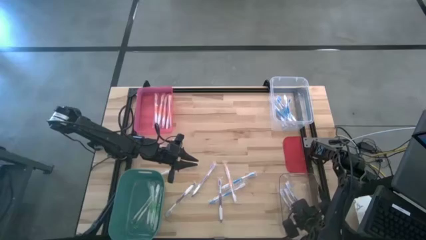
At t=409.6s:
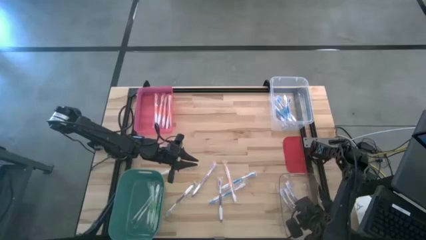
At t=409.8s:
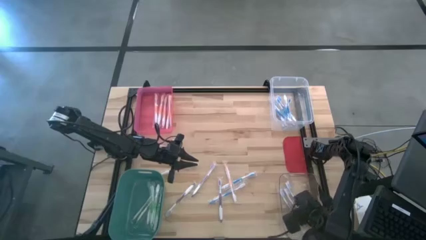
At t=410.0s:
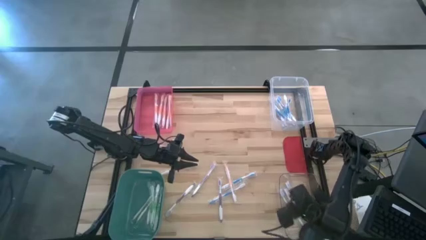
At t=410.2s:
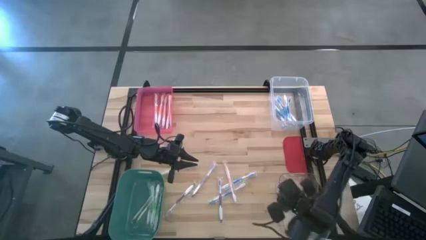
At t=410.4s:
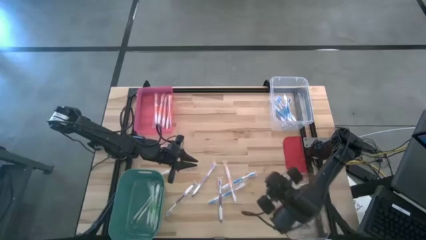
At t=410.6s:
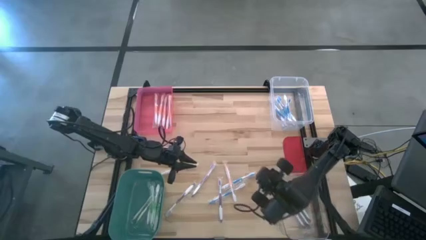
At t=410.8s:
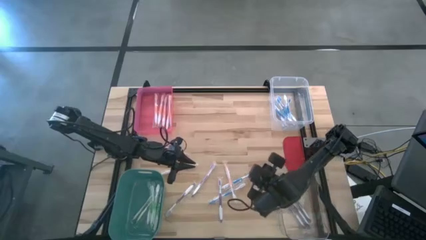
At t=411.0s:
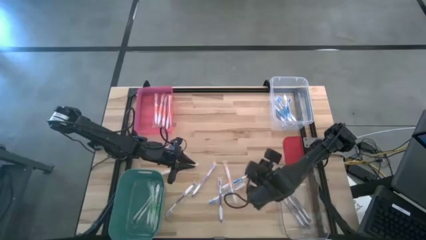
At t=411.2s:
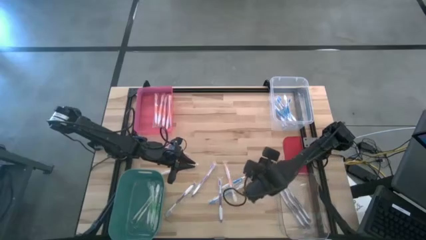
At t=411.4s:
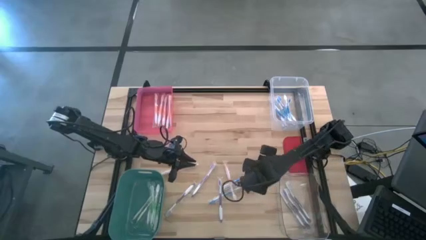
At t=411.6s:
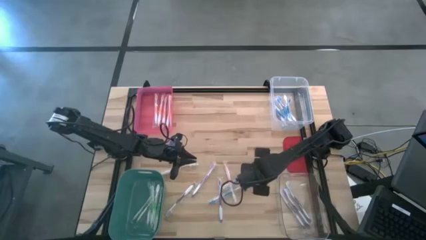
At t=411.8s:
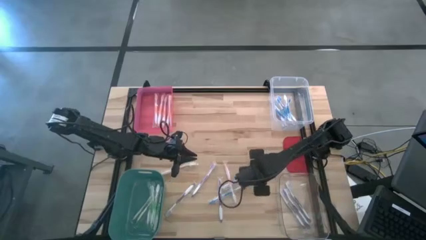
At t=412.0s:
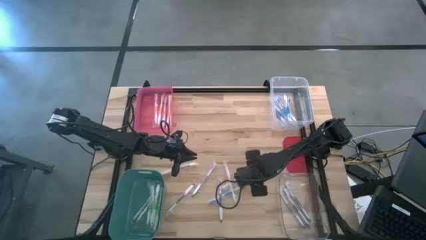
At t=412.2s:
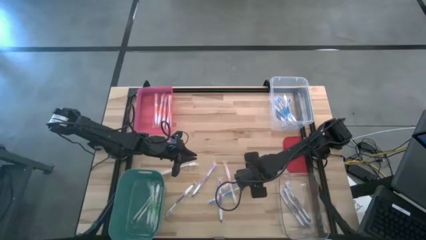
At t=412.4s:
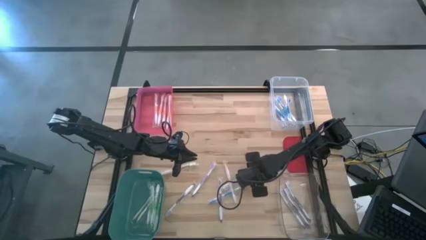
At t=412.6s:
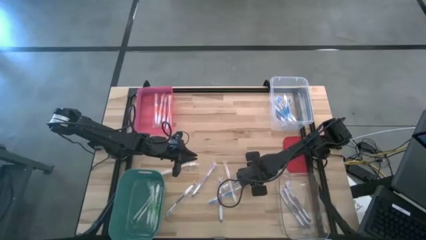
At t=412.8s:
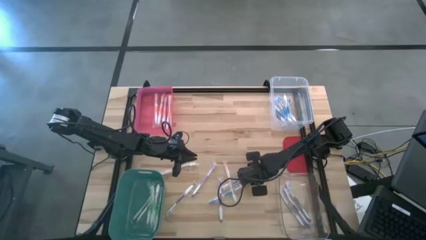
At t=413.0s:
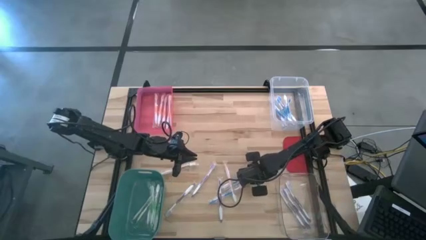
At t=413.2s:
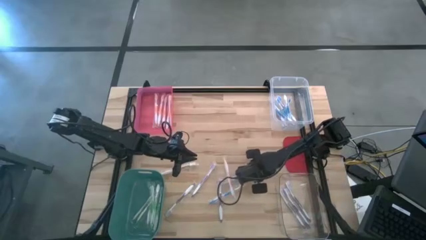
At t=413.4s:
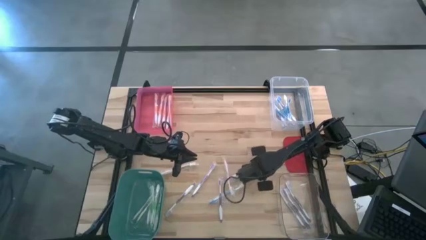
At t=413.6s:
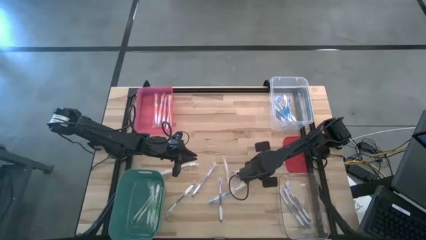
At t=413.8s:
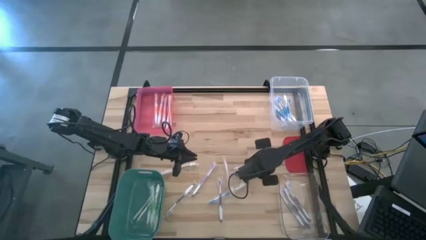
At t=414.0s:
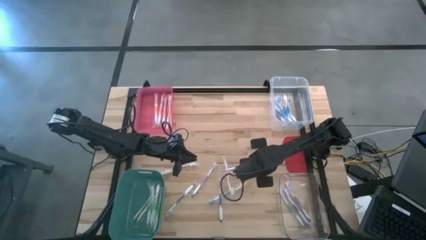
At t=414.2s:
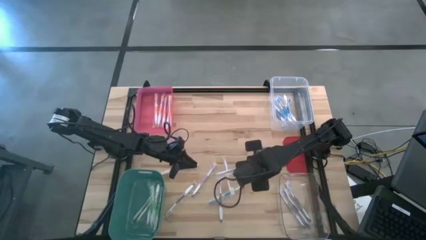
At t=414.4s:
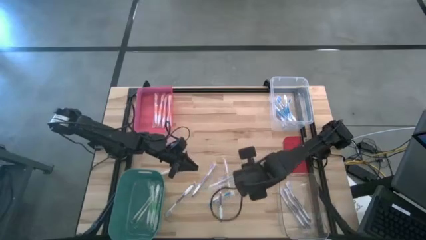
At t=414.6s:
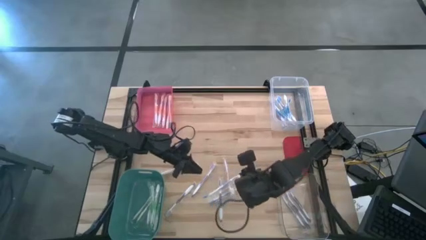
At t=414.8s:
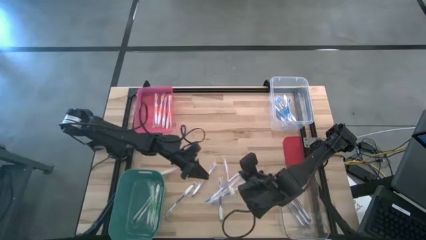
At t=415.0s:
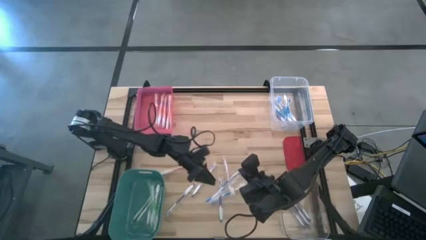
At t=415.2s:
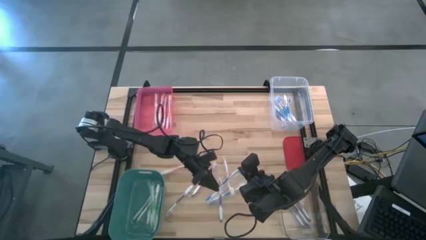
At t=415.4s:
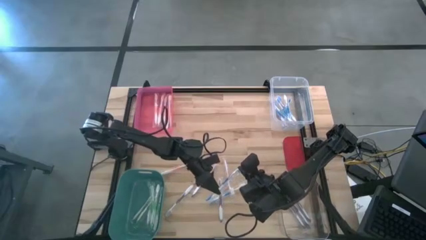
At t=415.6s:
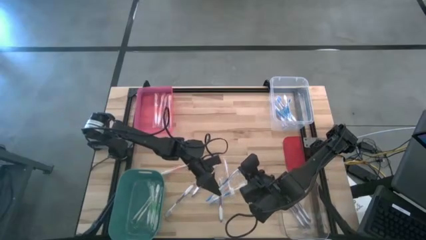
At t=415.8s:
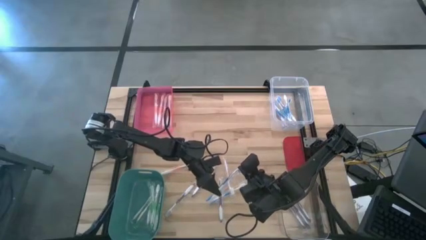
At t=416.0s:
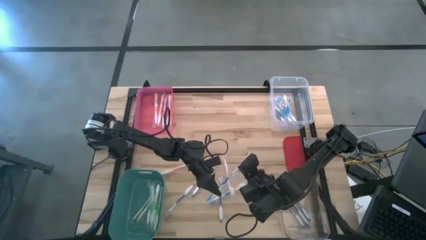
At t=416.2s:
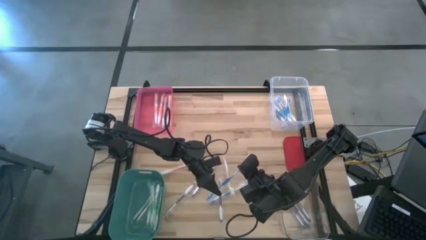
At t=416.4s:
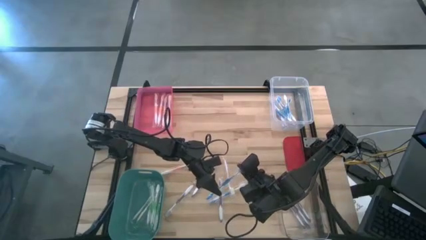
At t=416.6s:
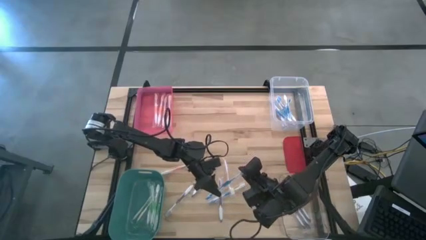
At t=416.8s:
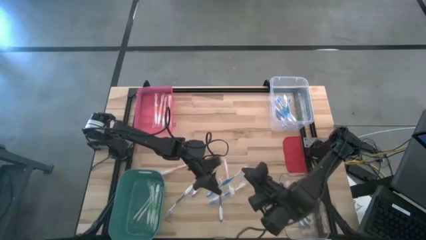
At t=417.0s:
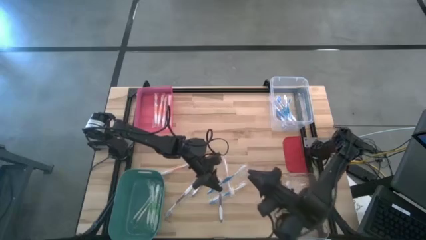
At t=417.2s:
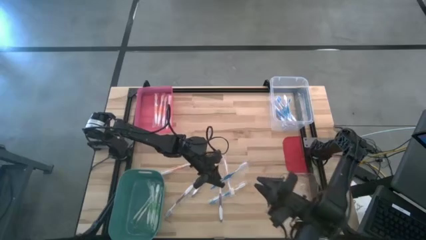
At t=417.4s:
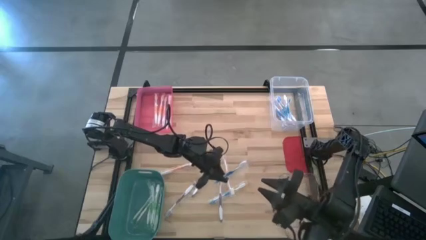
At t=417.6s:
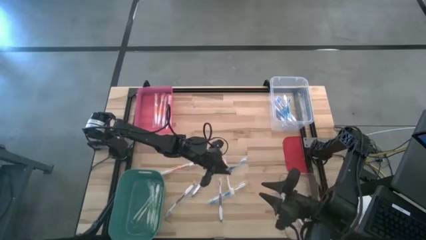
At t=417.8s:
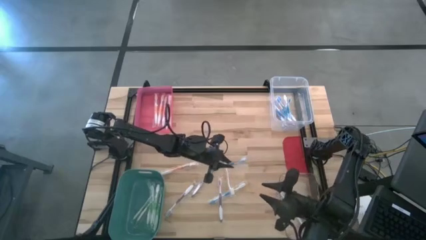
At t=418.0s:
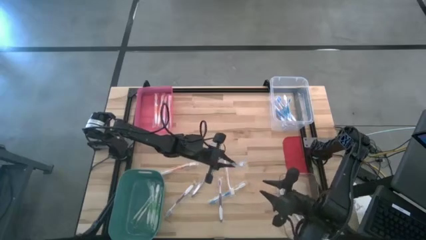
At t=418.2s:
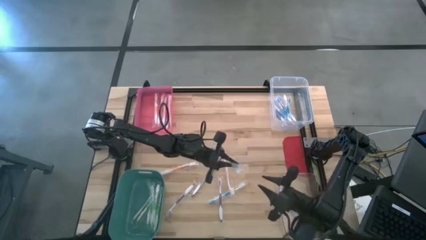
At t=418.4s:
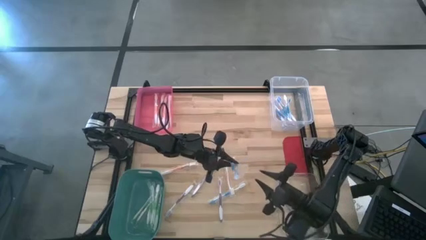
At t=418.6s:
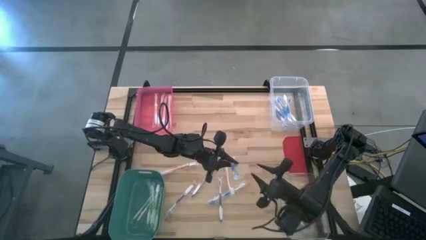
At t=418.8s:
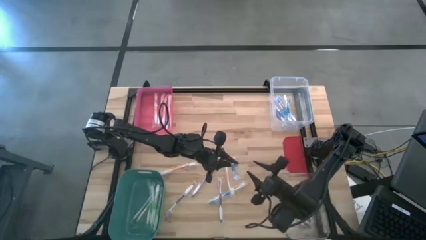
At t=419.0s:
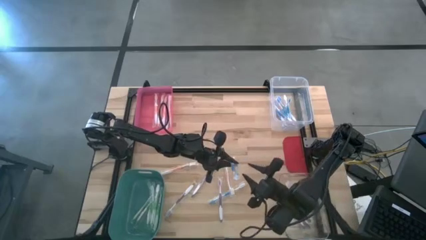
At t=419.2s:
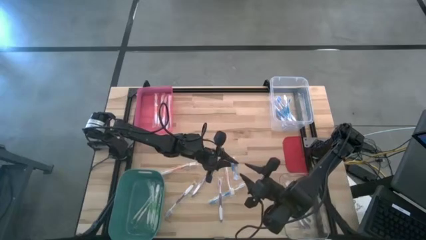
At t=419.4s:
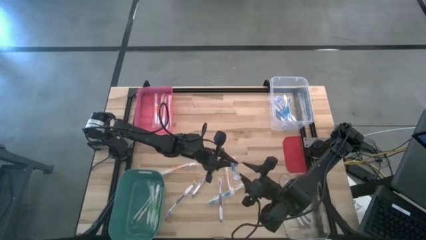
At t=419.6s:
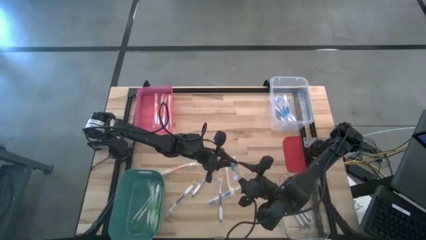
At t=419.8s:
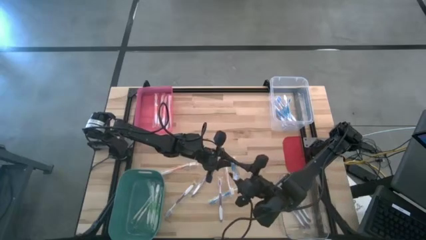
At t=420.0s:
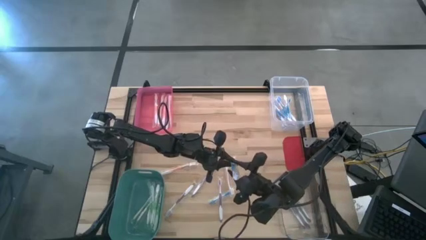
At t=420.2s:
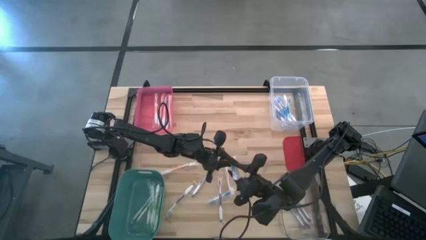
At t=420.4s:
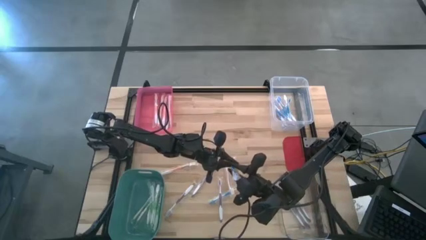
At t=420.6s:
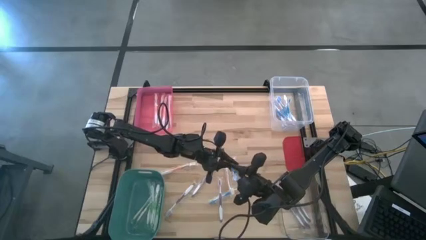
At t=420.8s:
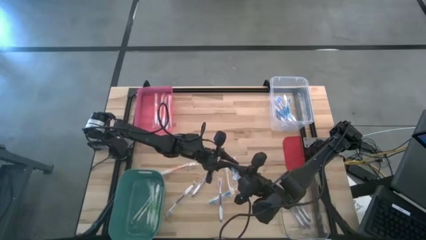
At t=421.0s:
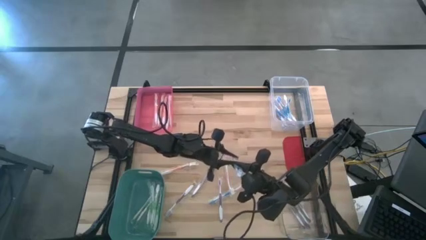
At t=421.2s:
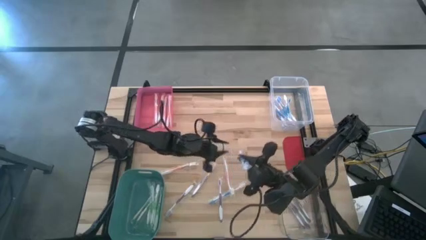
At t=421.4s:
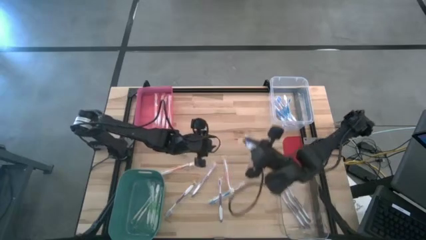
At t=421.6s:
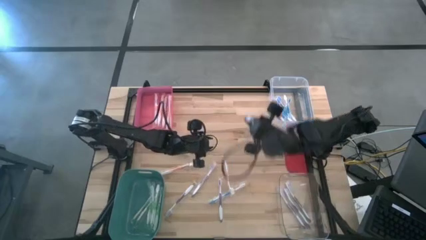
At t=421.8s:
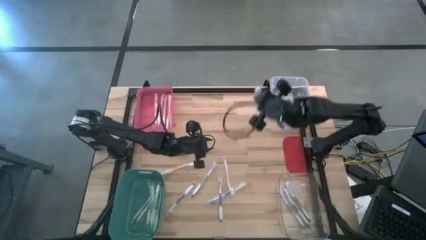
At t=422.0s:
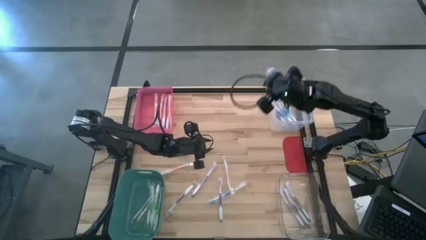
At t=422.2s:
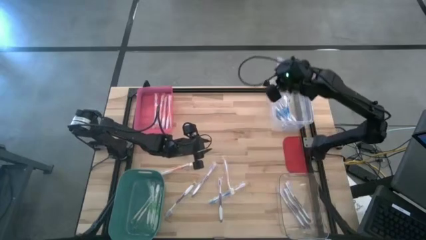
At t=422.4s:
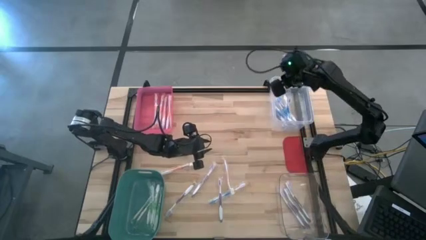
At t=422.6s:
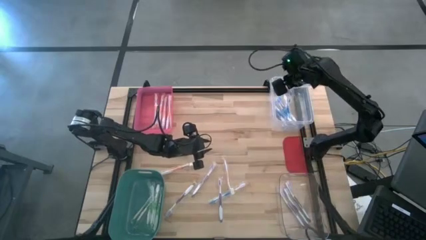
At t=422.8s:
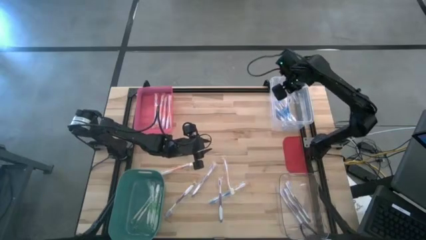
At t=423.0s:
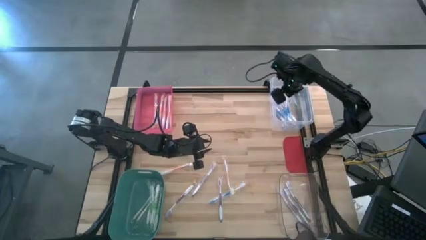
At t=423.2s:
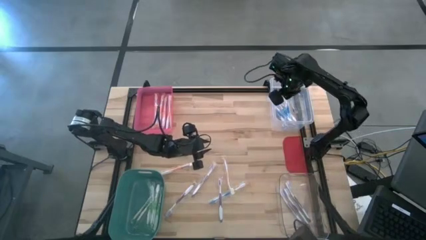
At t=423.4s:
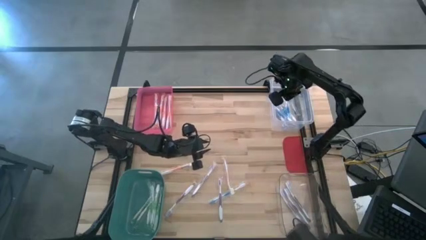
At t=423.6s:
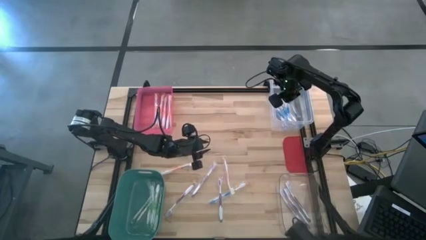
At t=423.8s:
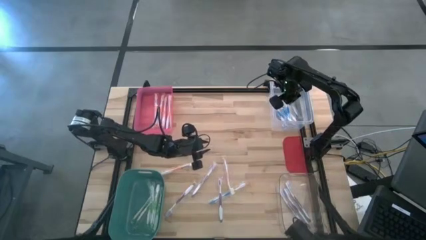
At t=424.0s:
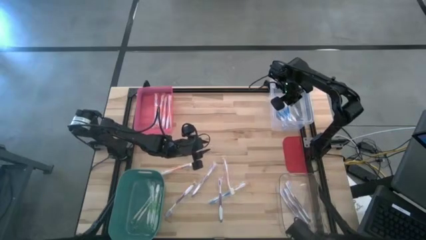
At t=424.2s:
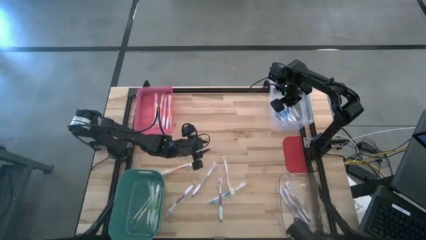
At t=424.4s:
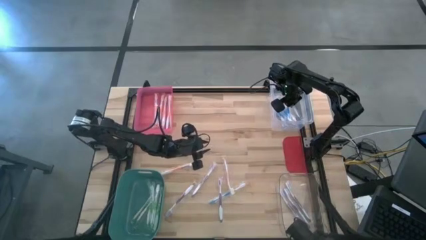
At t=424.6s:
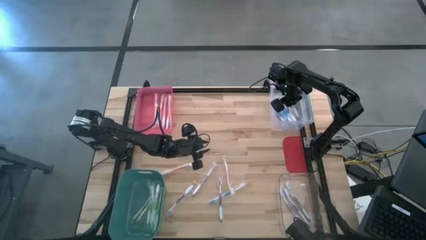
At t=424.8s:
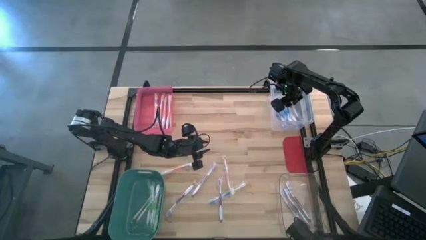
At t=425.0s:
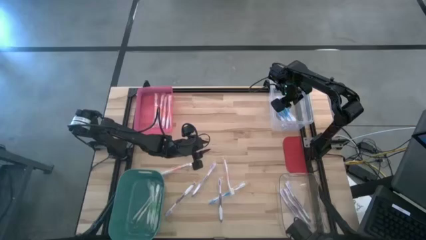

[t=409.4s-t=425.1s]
Task: Pick & Place Toothbrushes
Put the blue toothbrush into the top transparent bin
